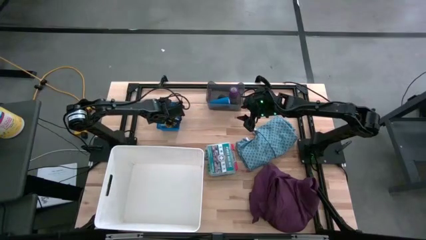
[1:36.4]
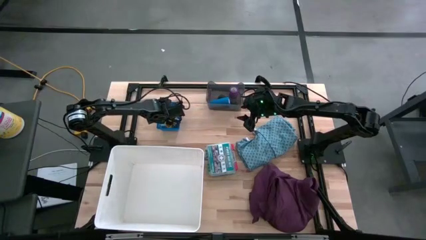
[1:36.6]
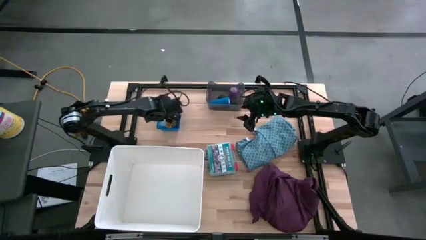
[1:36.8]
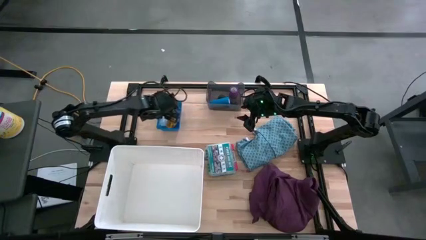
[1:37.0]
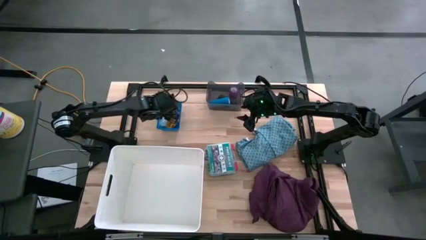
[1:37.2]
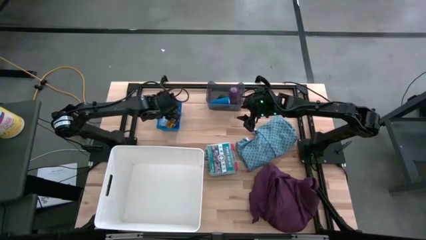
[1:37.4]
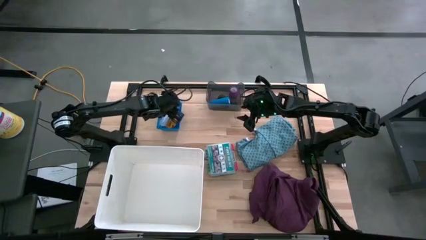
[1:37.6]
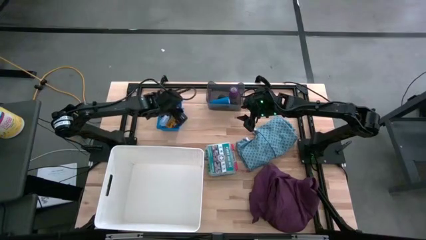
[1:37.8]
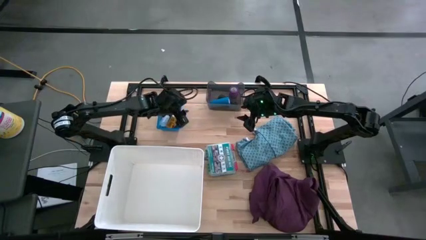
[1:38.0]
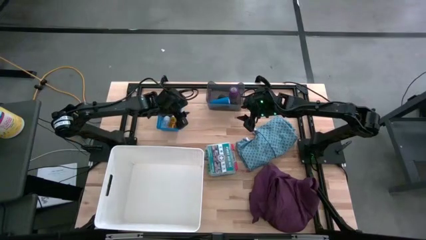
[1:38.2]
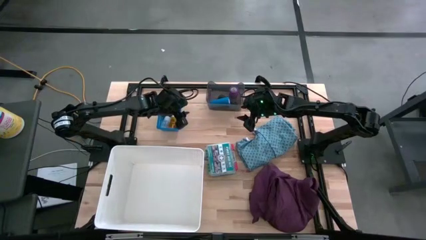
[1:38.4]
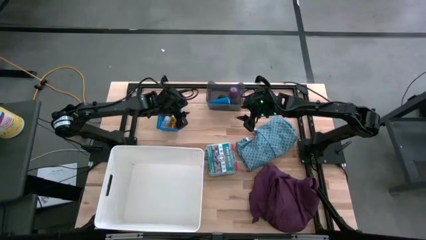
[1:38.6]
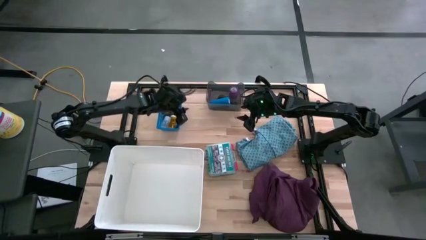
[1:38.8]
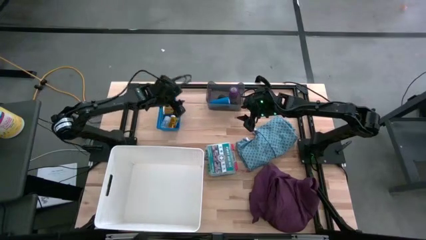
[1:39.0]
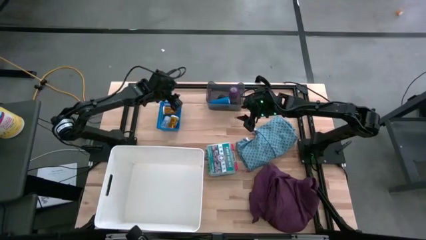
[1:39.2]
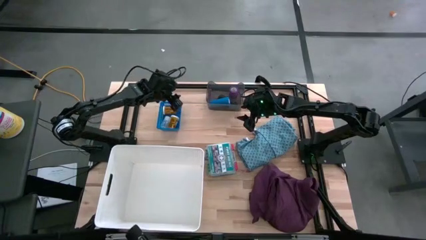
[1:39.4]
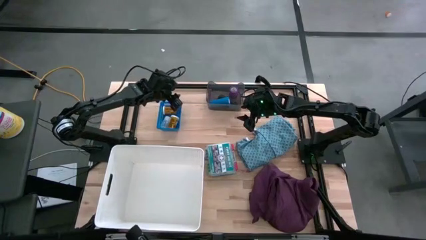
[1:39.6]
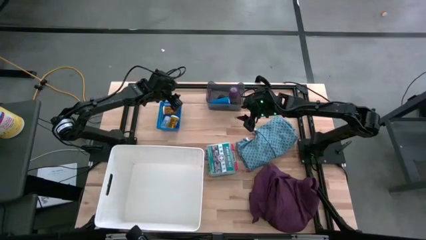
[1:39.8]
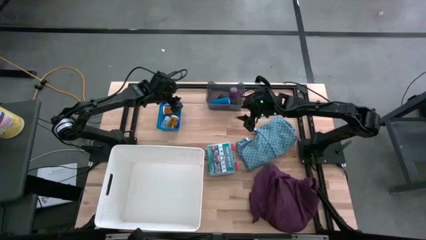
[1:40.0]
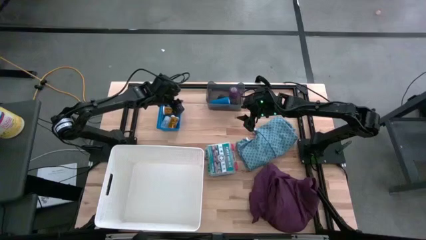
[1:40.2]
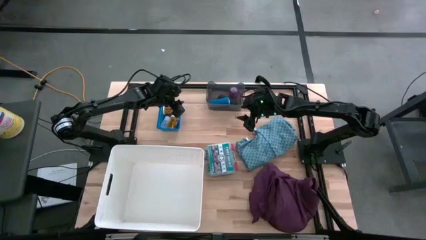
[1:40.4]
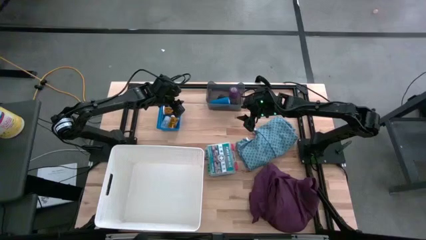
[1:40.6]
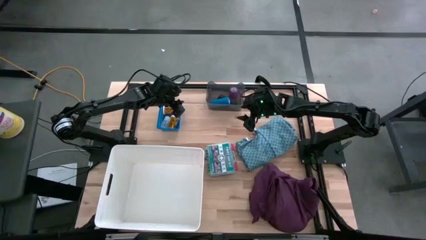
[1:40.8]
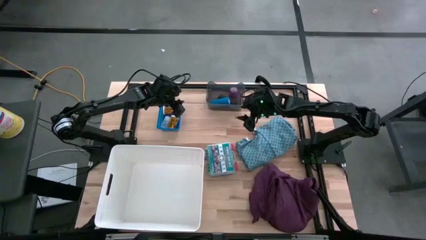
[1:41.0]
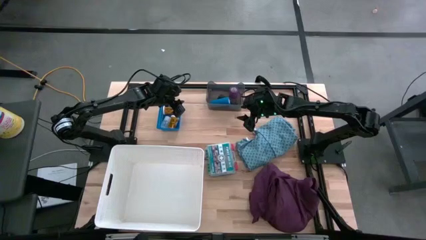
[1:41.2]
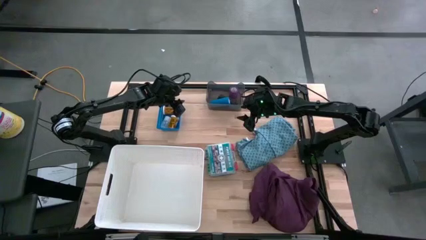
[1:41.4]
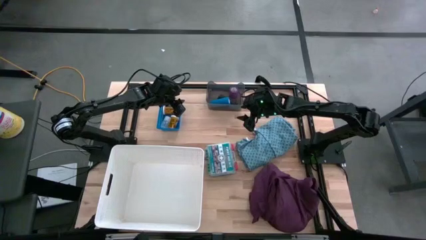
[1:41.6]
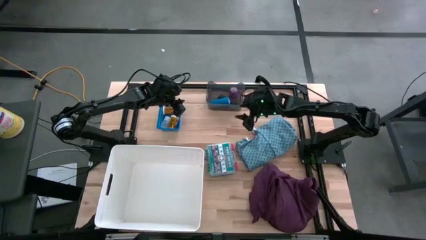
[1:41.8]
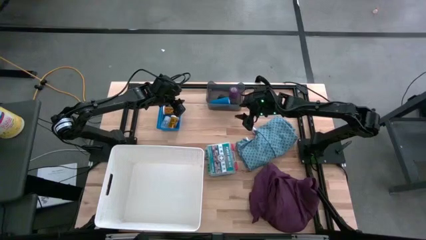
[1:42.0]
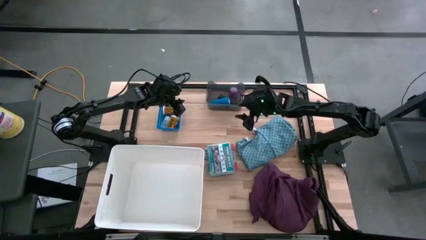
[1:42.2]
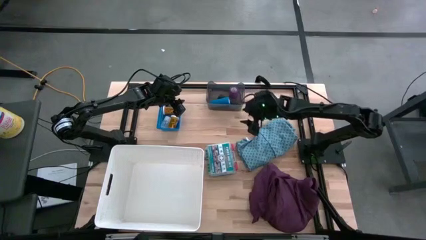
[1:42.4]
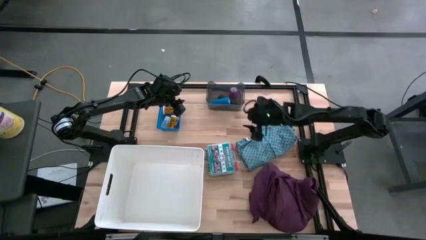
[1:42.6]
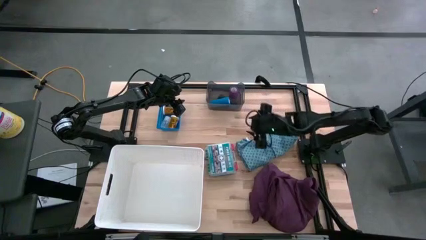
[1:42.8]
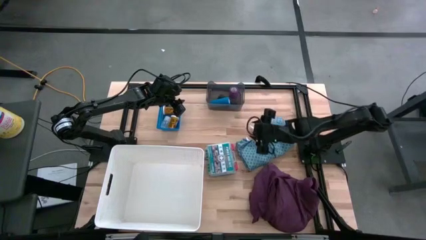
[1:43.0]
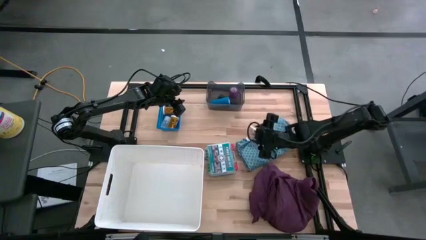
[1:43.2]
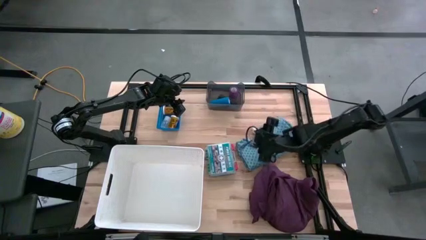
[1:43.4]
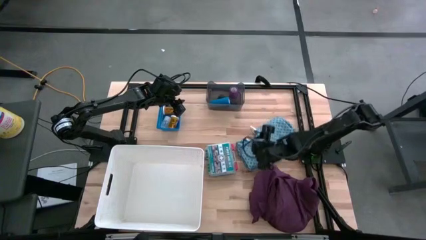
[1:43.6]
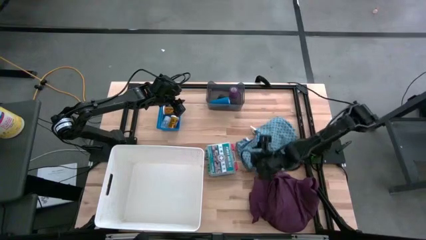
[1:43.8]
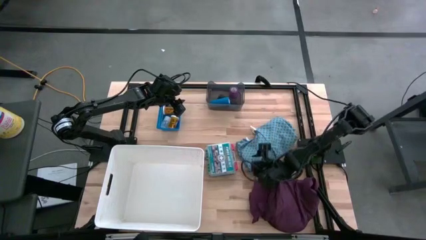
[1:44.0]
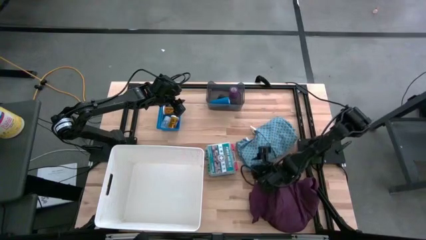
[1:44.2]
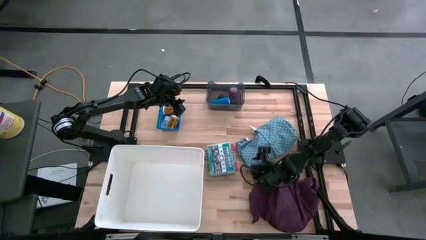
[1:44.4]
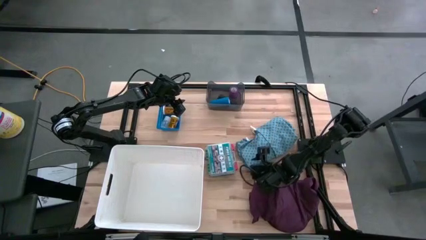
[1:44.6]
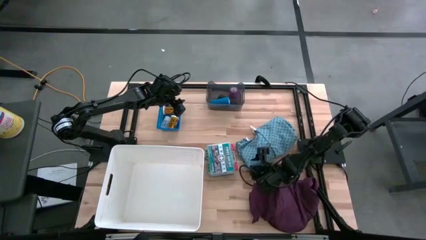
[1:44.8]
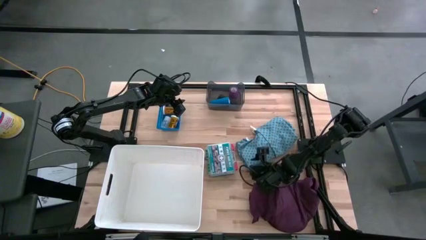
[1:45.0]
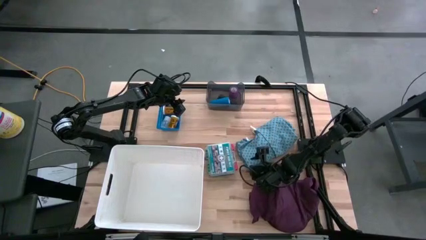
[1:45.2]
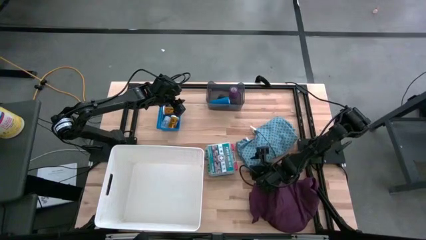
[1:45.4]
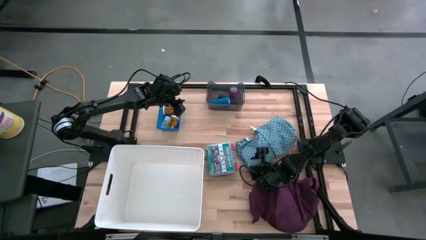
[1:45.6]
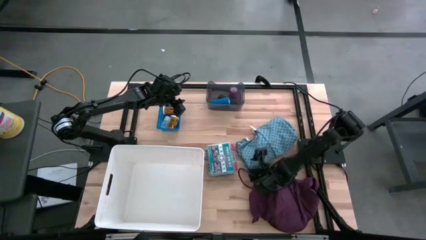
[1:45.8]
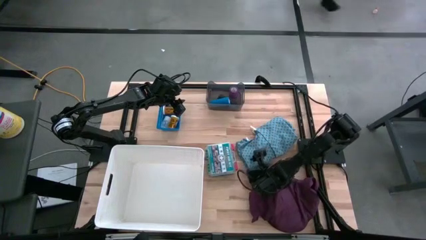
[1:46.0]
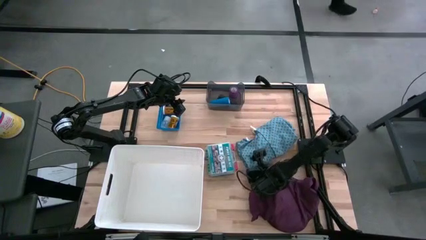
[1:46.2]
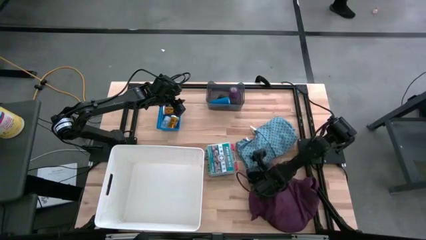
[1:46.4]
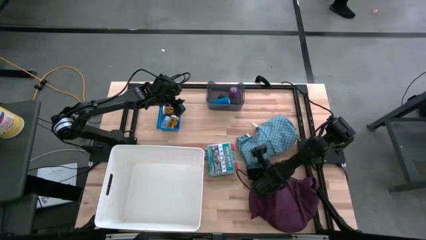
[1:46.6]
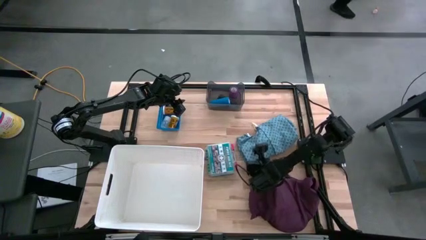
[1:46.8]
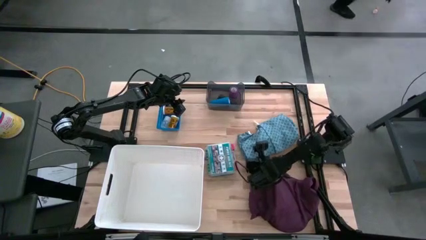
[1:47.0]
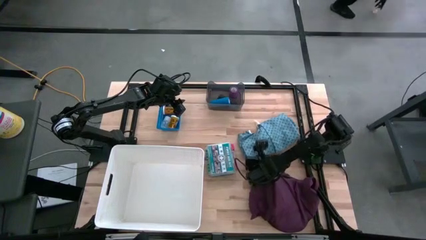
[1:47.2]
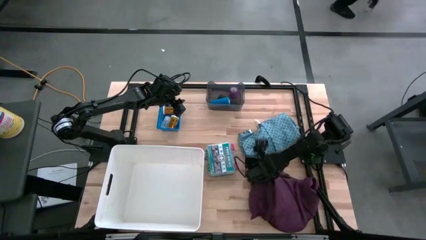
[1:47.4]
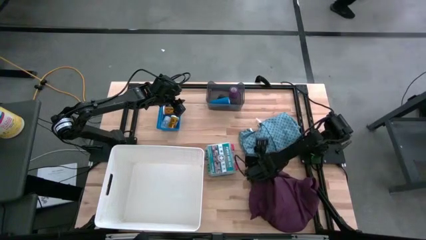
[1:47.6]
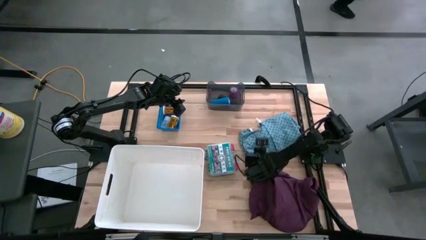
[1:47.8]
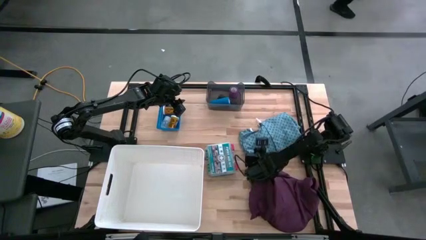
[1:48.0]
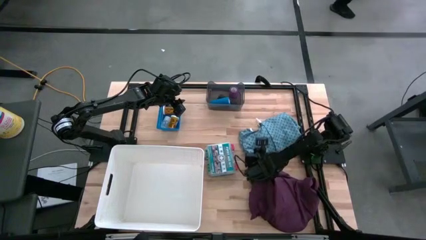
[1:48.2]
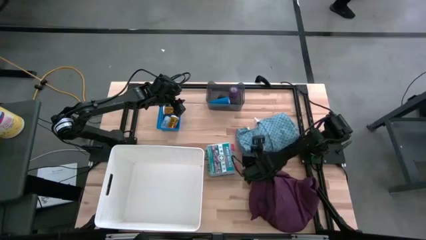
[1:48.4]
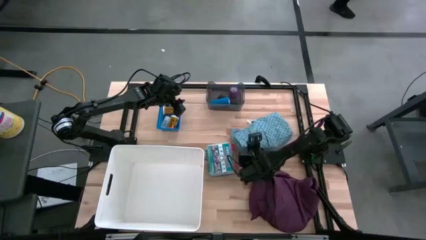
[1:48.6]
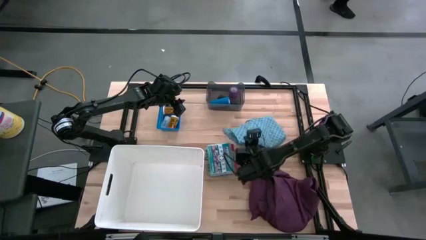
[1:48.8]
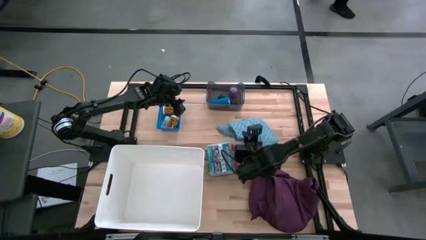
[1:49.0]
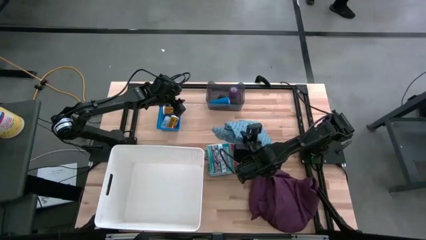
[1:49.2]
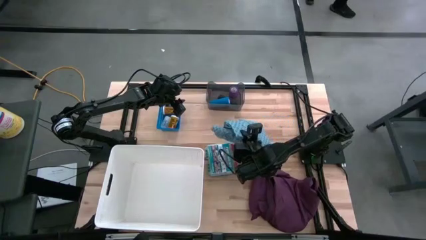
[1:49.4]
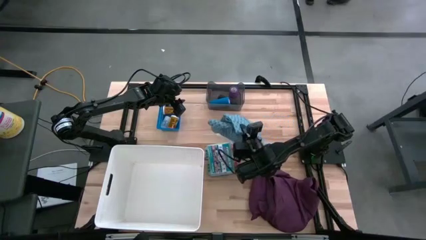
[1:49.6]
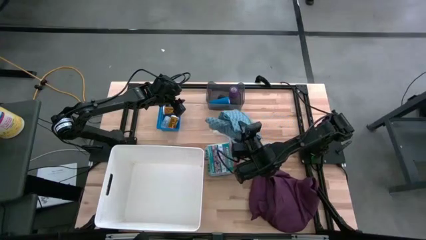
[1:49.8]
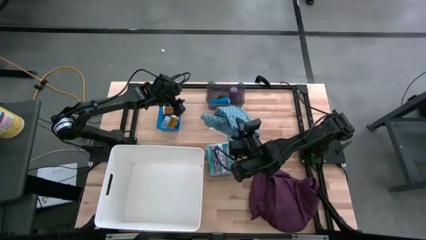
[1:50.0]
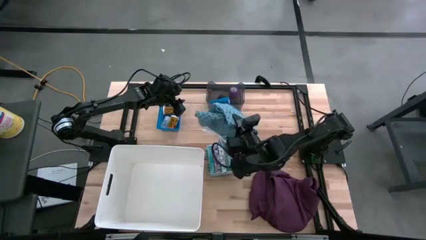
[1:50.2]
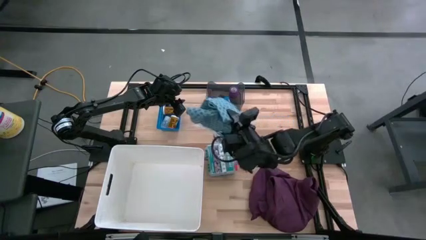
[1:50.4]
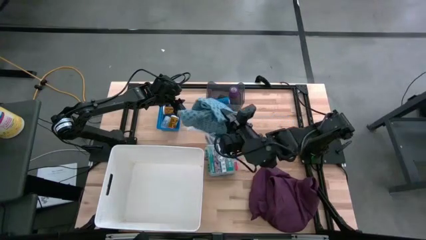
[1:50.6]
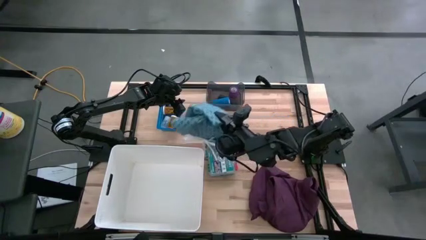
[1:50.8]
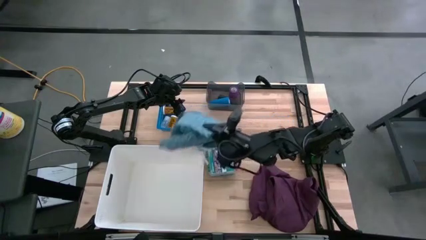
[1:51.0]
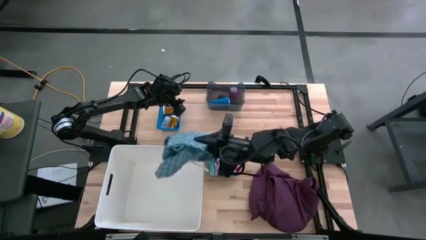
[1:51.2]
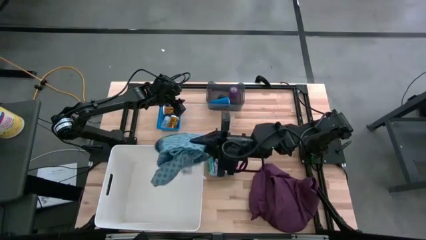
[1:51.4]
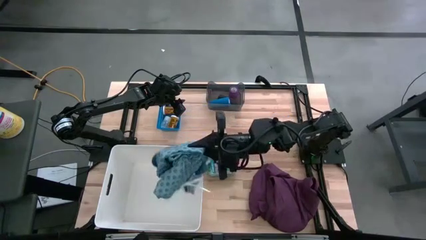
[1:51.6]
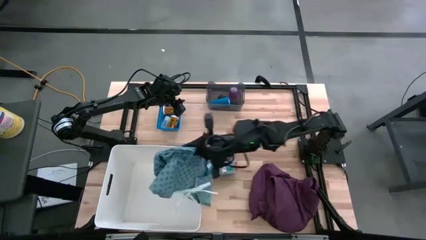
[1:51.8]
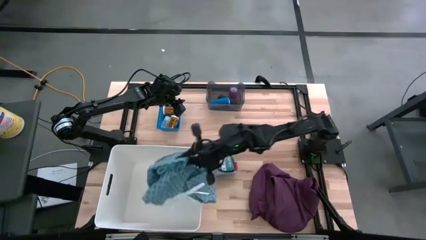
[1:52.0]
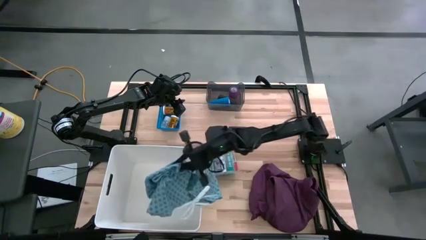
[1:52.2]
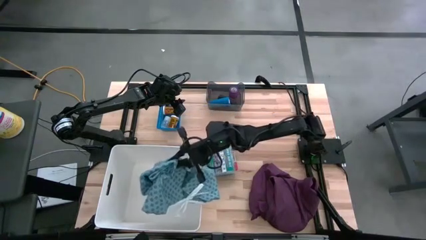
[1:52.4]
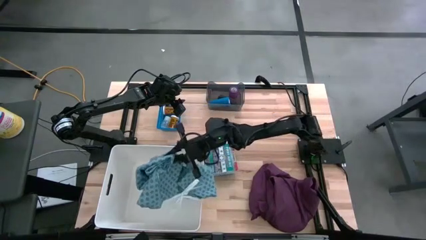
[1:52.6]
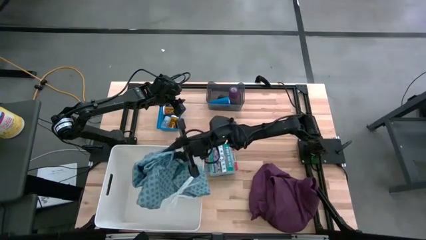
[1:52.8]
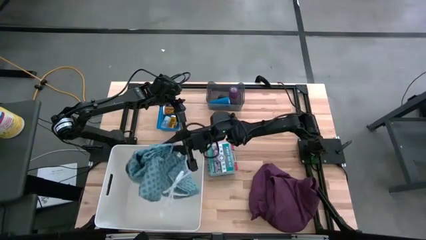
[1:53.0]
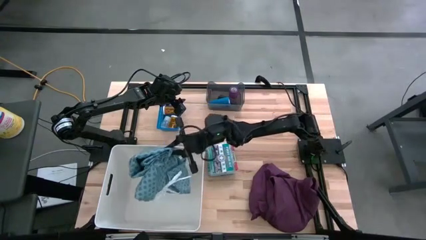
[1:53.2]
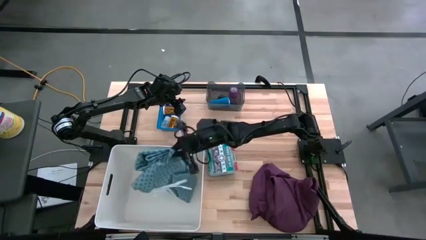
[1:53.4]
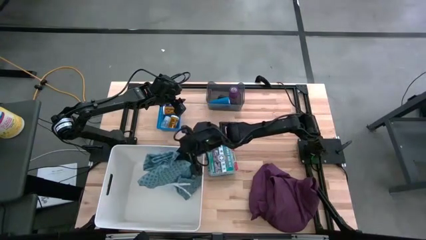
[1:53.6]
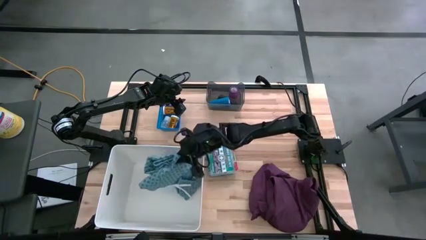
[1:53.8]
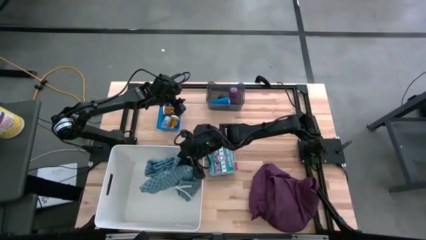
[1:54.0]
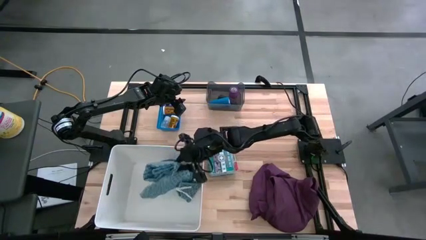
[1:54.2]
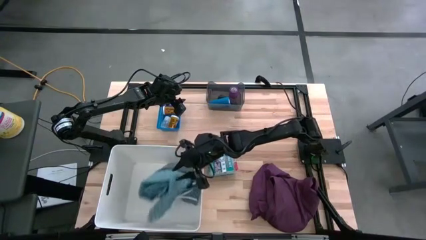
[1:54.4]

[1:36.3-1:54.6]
Task: Pick & place medical supplies in basket/bin
Put the blue patient gown into the white laundry organizer
